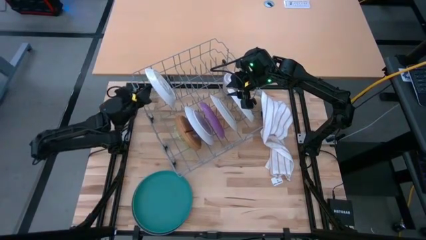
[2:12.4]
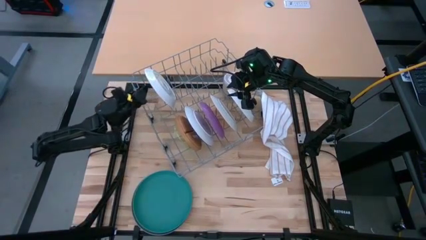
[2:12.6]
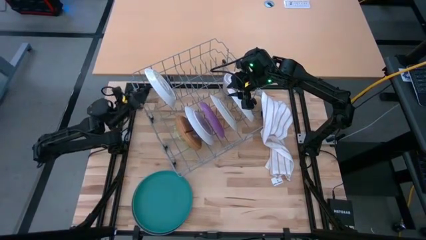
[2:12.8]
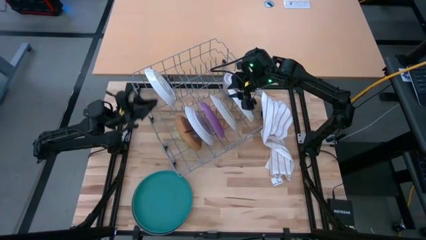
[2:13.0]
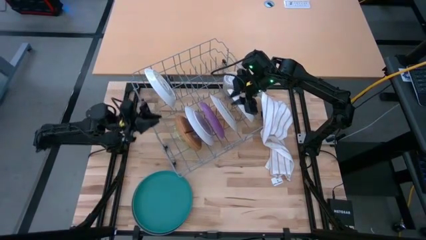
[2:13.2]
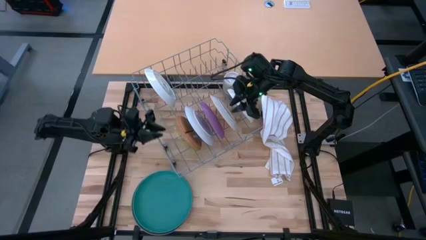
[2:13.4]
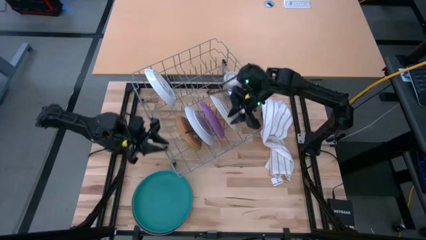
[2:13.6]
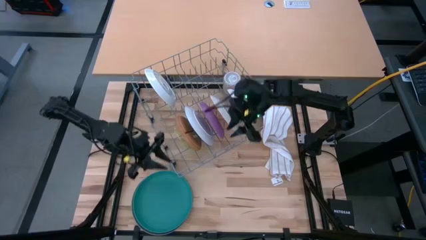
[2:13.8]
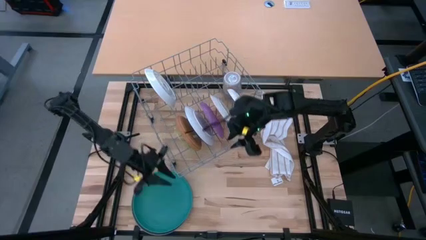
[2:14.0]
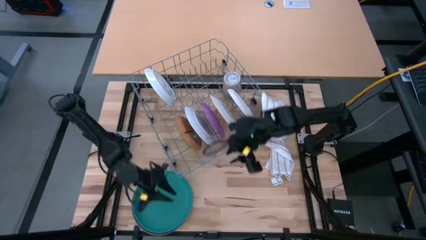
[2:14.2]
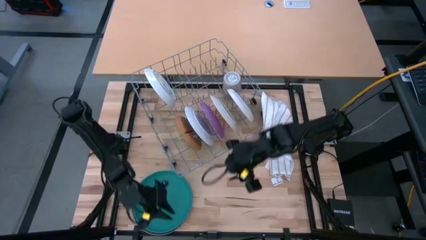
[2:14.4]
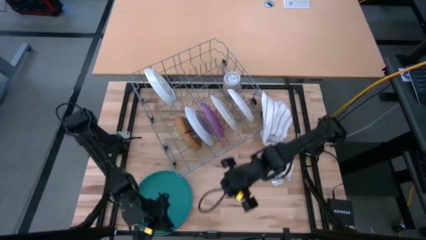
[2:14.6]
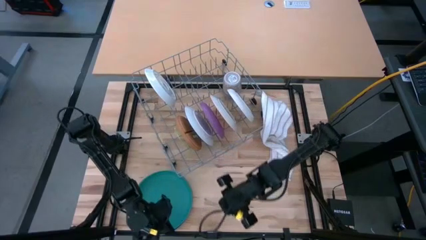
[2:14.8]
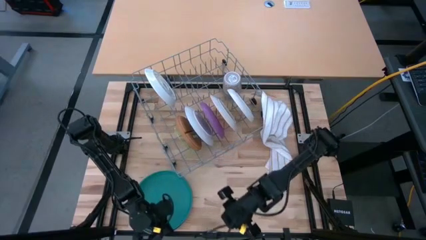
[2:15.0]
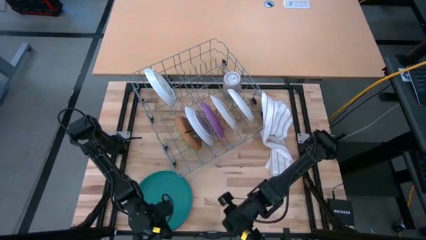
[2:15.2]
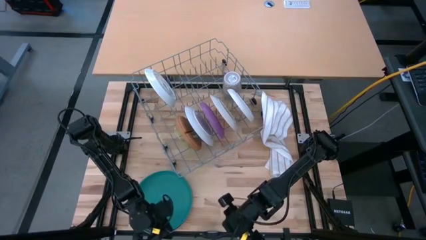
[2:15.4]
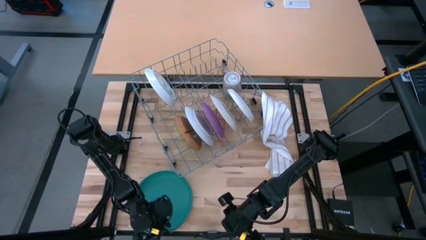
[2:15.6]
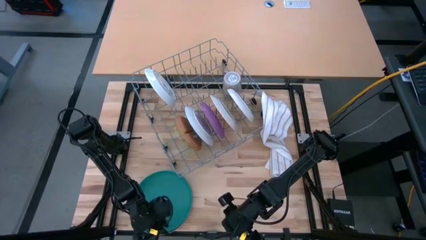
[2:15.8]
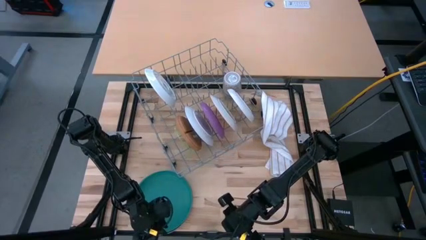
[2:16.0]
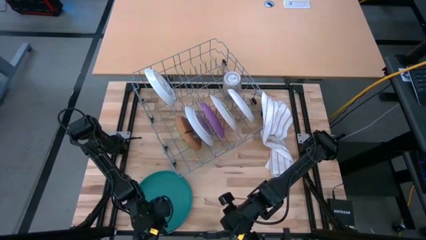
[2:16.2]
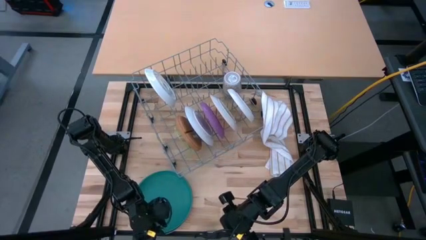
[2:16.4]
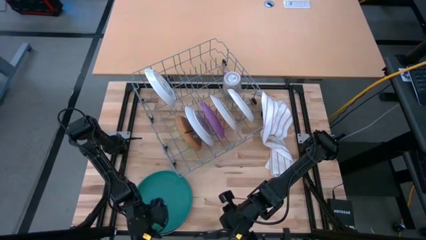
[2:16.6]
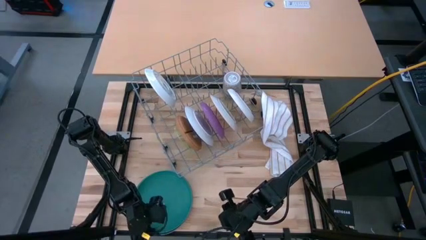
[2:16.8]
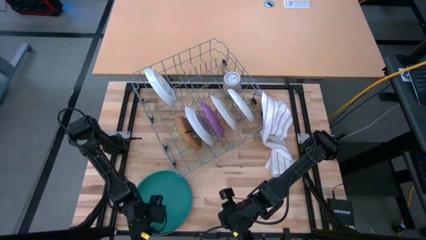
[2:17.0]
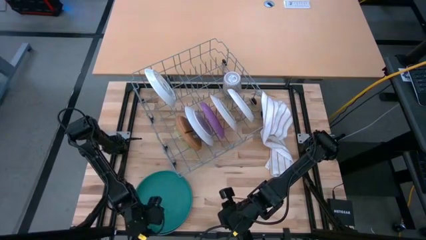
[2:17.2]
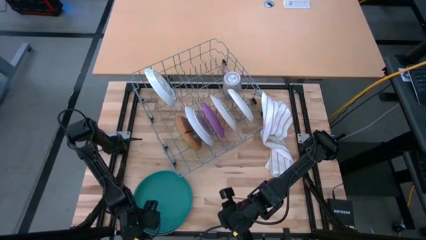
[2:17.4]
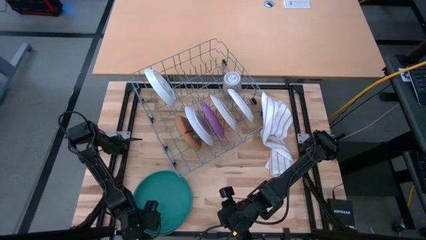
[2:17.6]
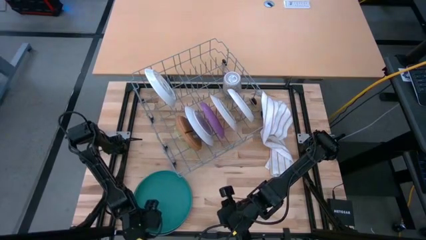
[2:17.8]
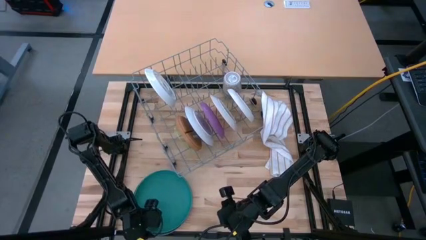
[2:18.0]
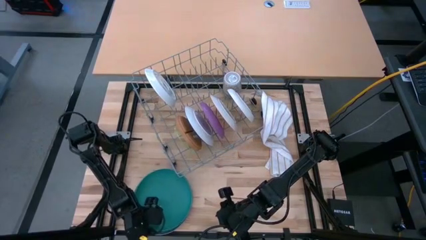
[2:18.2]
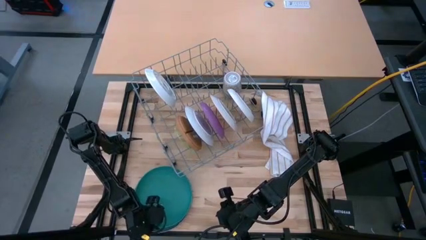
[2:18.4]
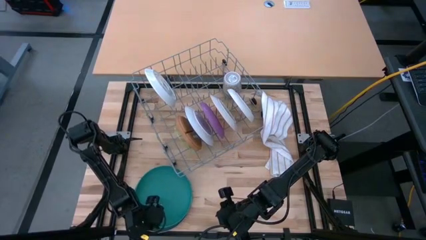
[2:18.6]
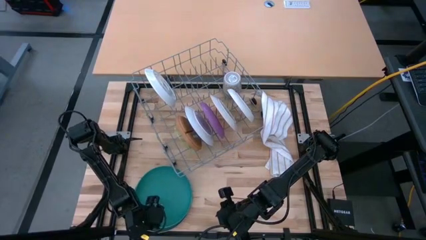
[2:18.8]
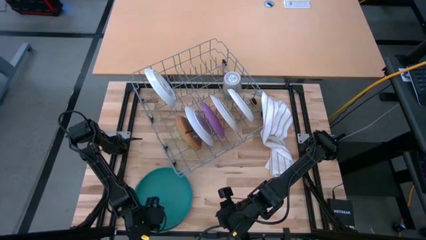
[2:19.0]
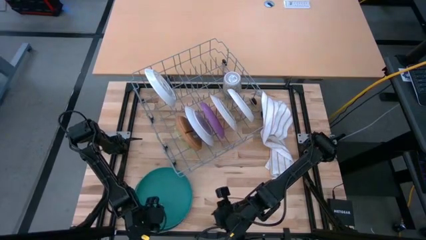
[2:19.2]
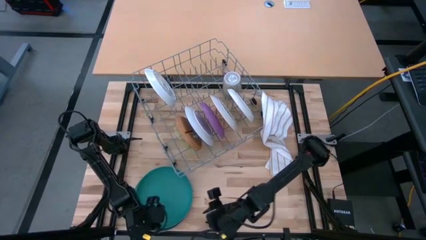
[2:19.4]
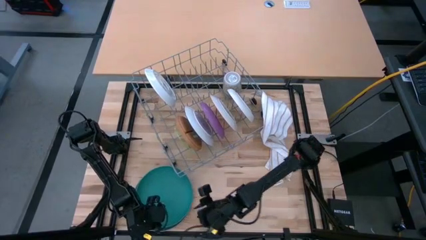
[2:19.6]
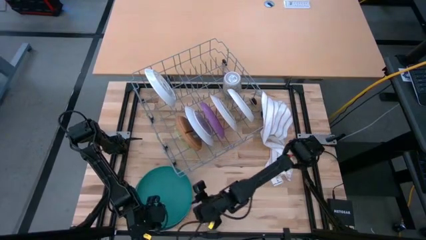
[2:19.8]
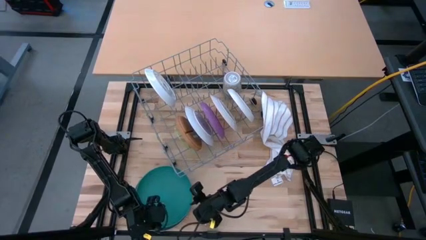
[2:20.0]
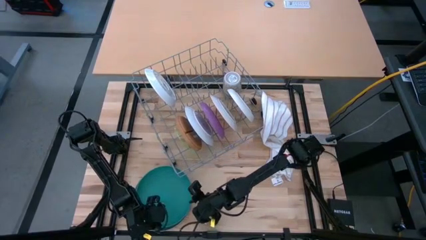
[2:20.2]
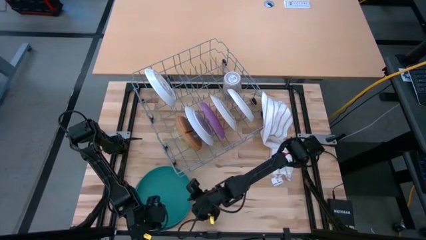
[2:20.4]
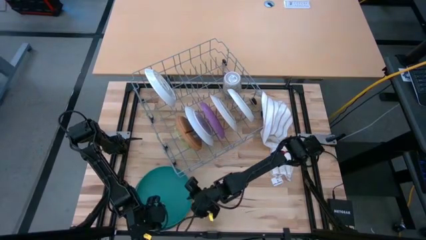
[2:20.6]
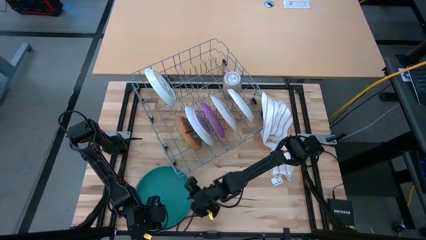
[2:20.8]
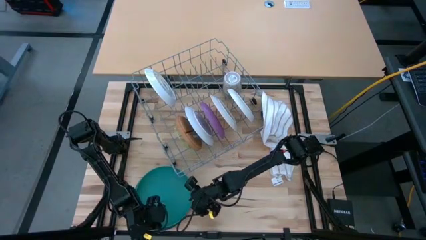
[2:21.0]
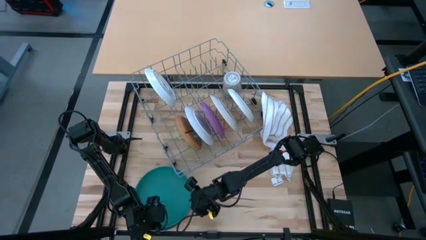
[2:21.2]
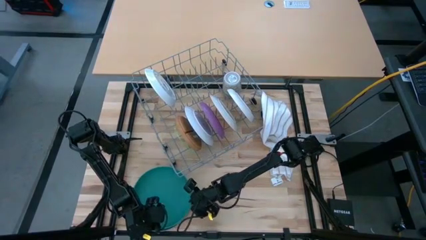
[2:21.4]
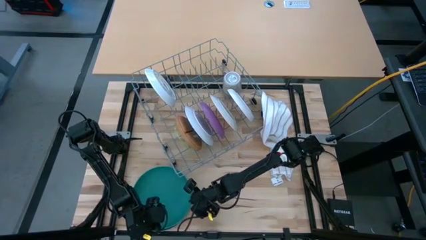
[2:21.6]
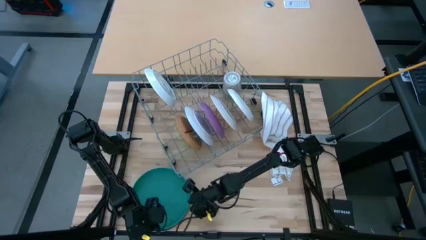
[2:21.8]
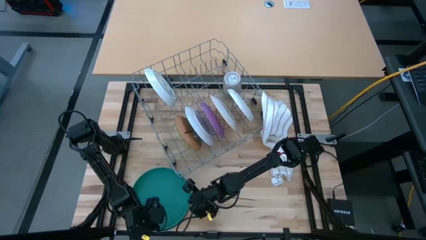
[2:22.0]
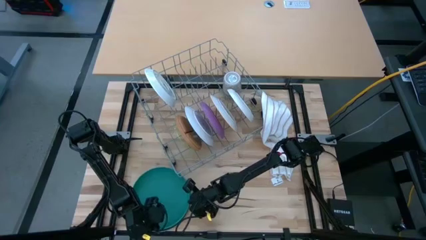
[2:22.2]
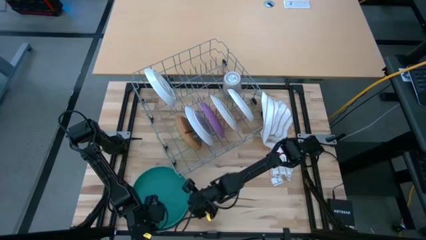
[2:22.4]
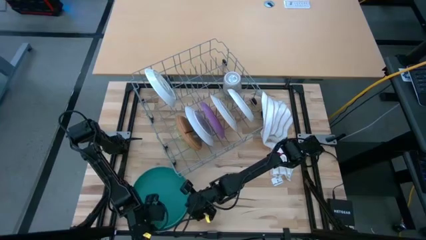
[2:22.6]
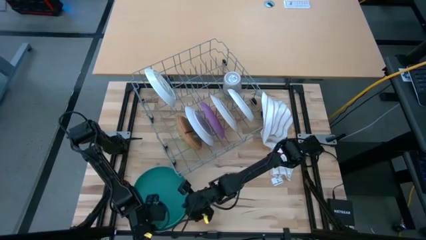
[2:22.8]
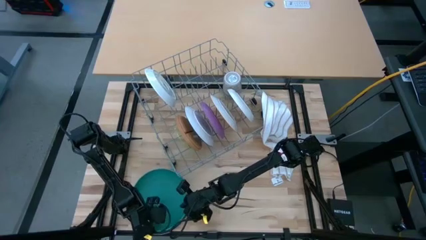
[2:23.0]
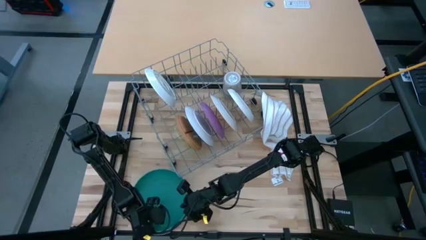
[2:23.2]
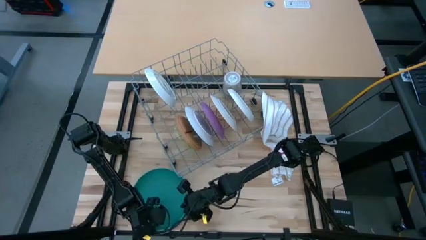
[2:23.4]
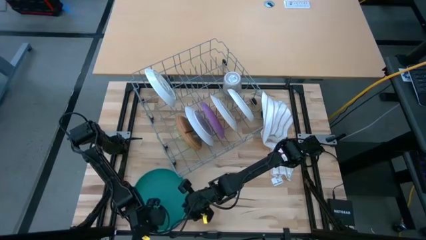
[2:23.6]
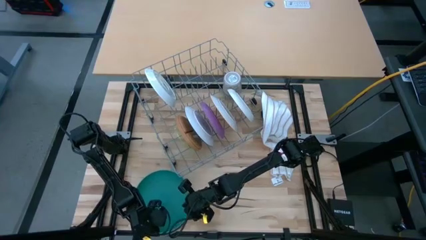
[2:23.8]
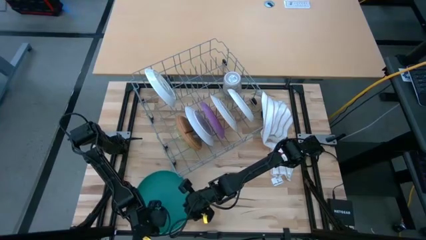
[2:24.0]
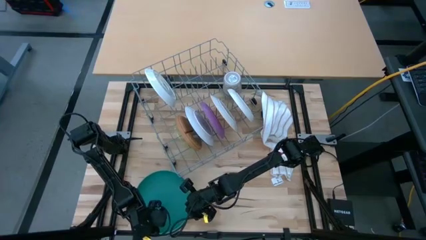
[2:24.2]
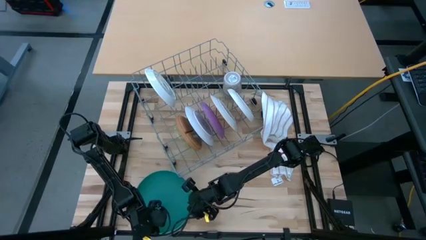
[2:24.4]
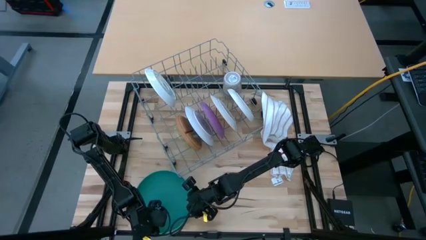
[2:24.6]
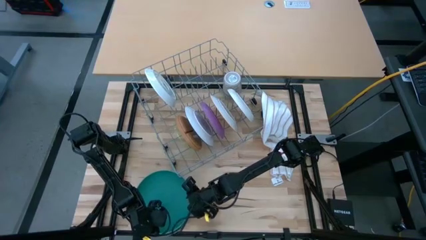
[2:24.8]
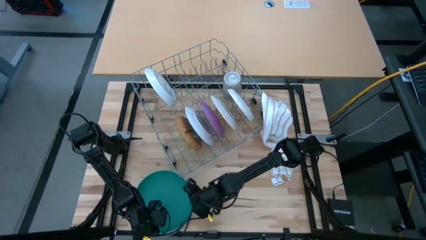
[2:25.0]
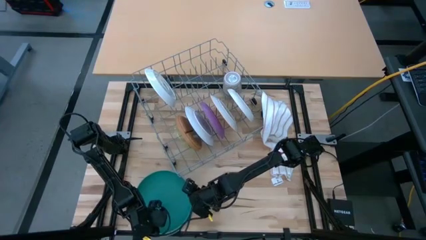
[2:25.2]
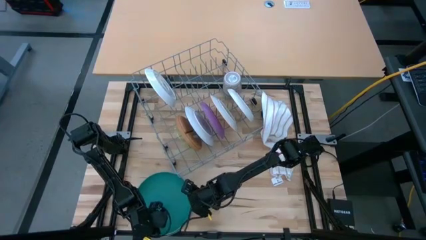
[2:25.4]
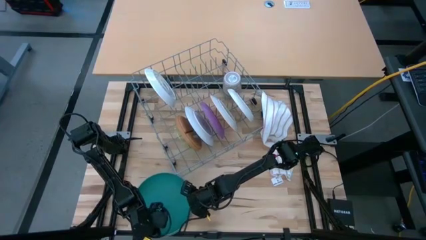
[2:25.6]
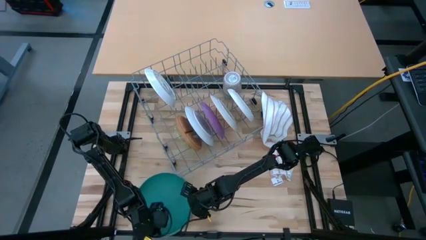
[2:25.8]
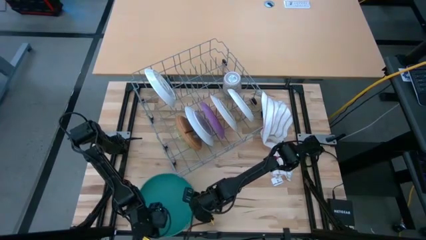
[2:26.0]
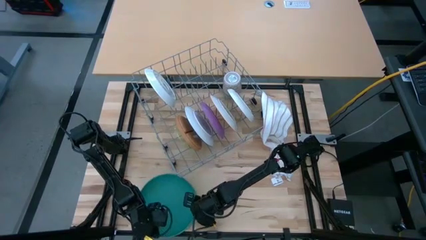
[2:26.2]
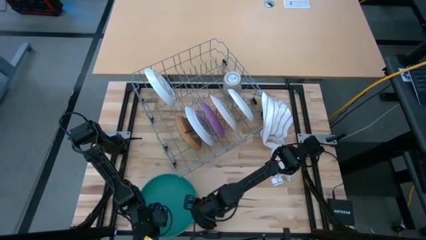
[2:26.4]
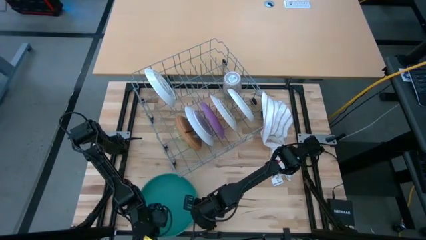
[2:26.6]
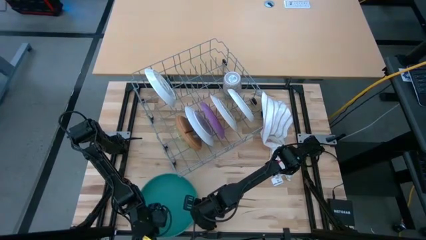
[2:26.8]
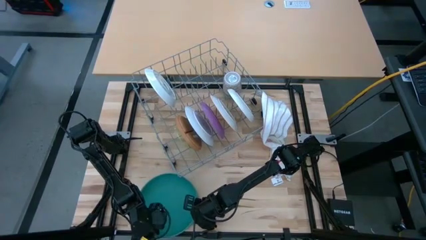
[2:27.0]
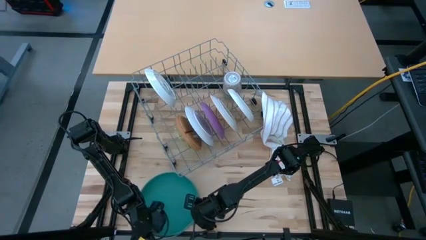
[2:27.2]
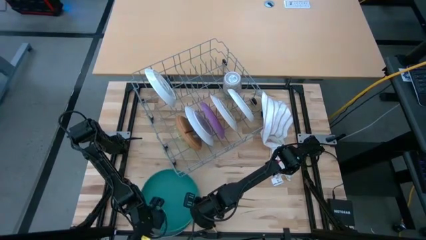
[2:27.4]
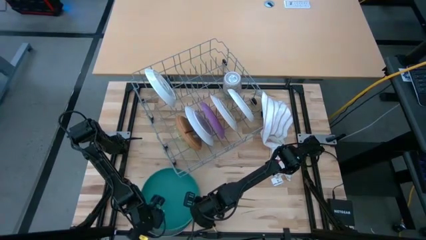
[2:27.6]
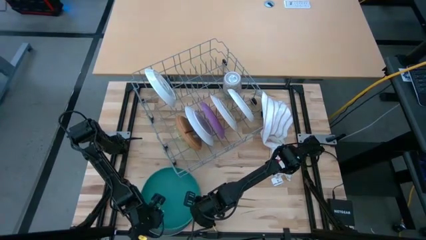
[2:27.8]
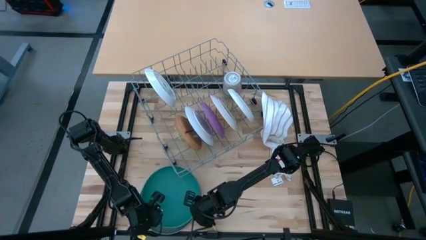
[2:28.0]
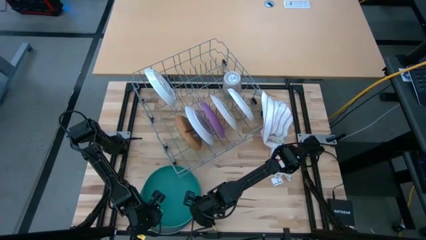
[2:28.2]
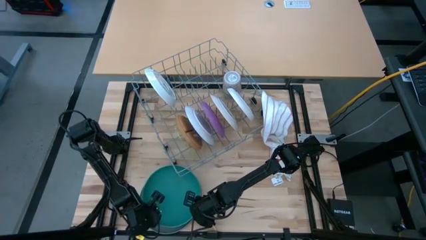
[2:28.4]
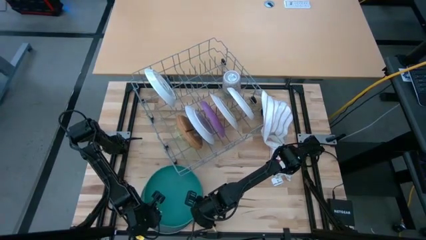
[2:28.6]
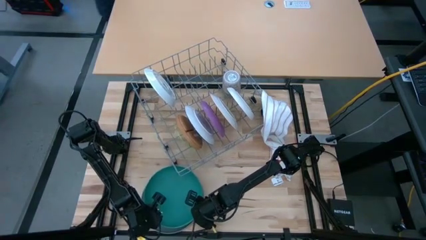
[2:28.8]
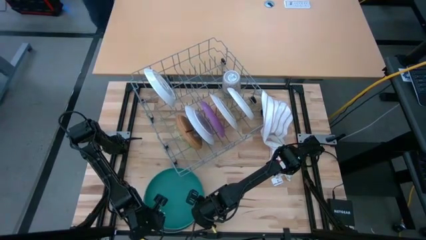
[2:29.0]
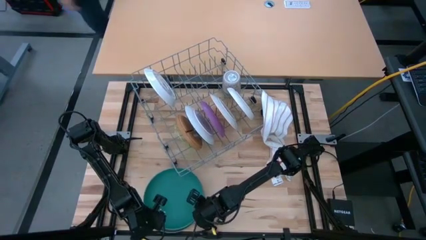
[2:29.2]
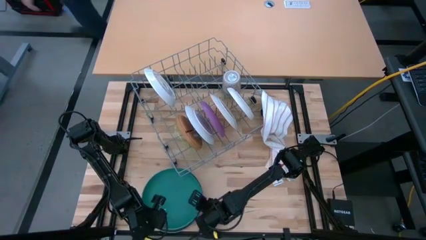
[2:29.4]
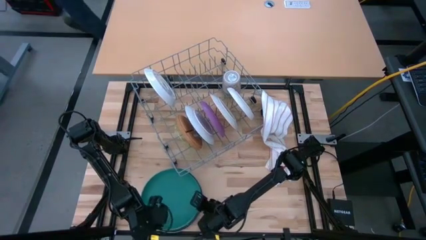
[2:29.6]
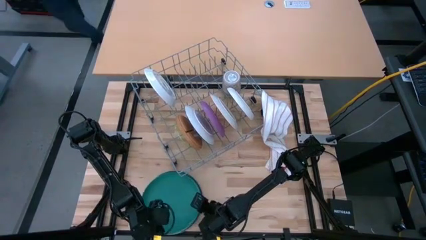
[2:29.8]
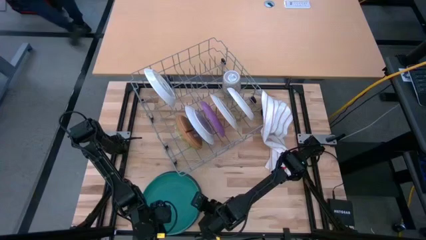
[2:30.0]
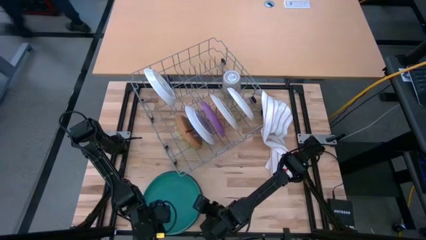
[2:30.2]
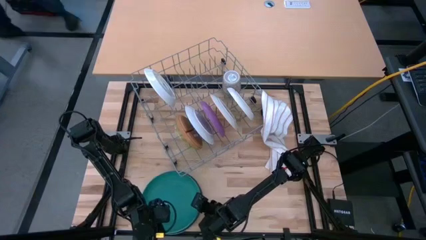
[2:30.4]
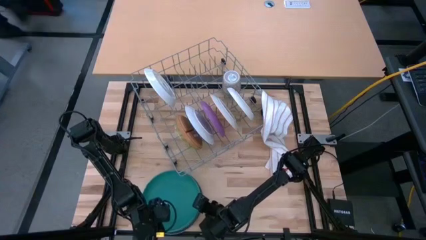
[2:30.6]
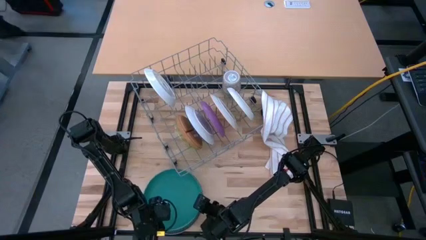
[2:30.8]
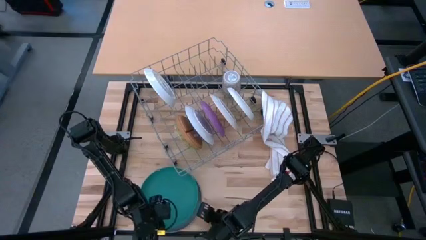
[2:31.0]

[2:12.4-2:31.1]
Task: Sort dishes
Put the blue plate into the dish rack
